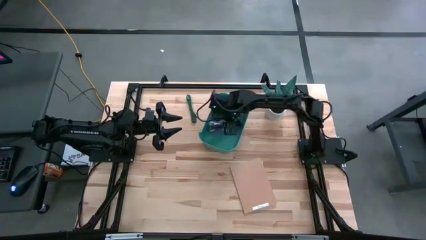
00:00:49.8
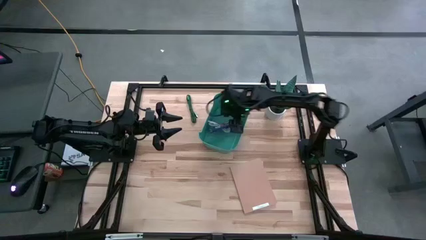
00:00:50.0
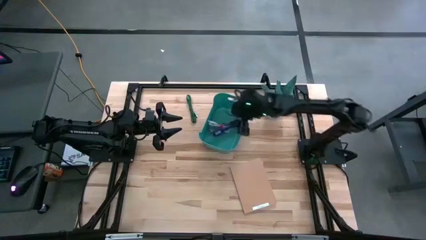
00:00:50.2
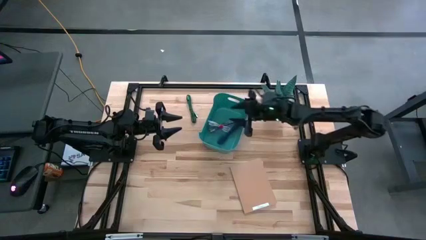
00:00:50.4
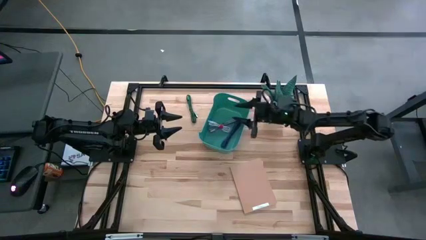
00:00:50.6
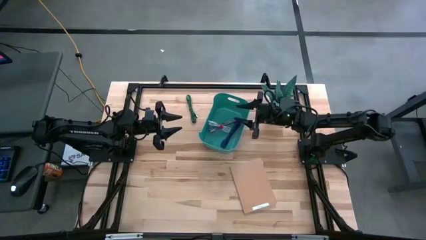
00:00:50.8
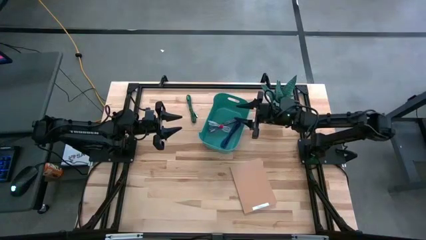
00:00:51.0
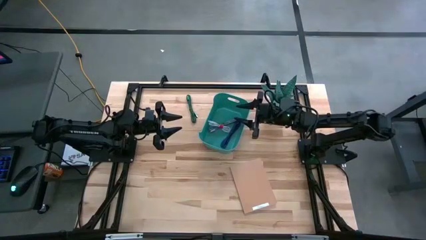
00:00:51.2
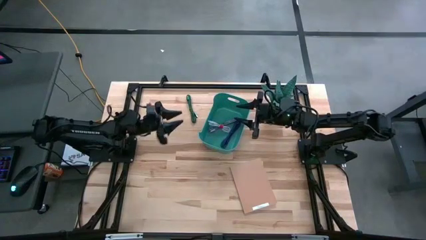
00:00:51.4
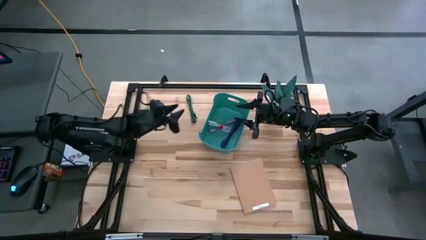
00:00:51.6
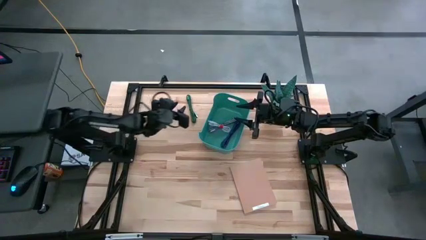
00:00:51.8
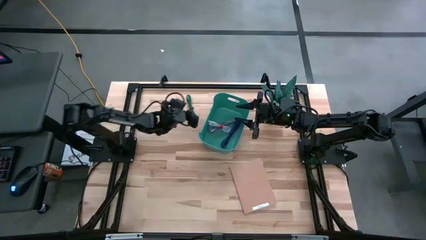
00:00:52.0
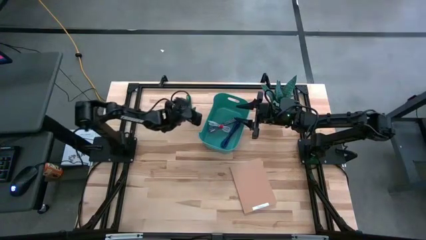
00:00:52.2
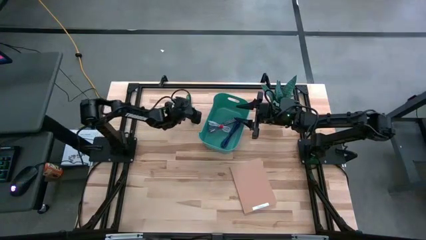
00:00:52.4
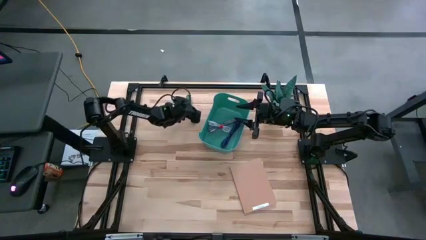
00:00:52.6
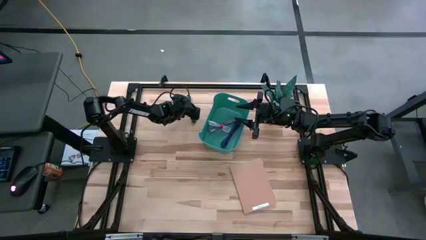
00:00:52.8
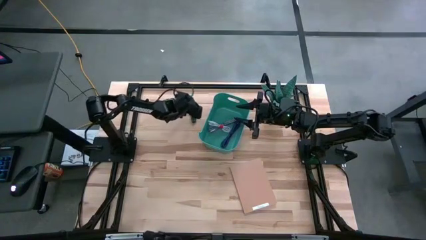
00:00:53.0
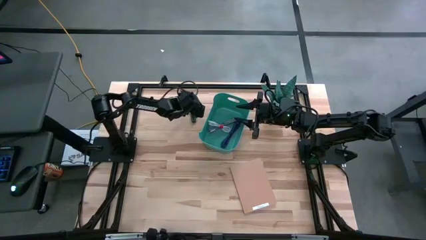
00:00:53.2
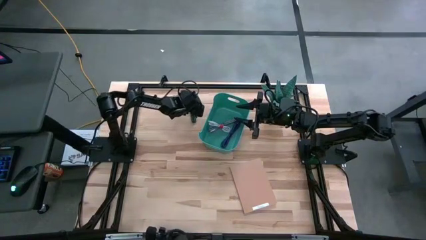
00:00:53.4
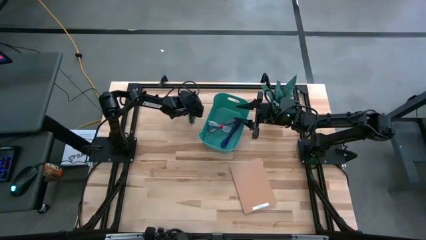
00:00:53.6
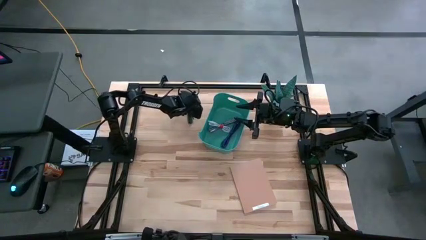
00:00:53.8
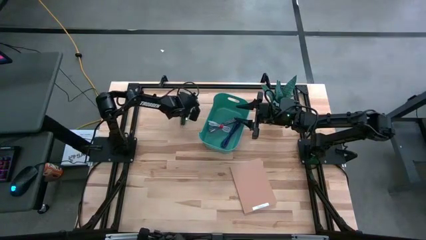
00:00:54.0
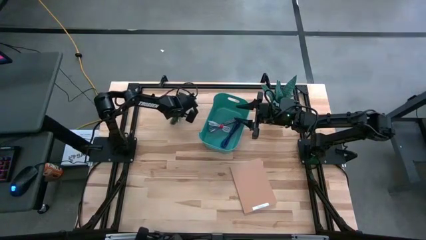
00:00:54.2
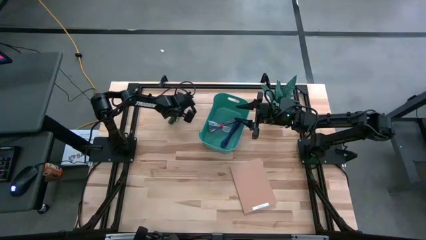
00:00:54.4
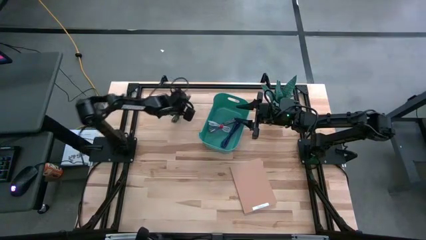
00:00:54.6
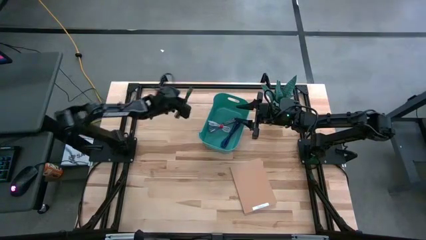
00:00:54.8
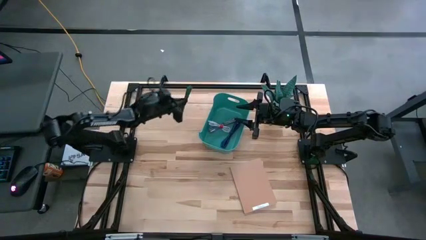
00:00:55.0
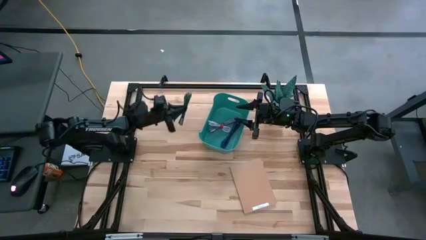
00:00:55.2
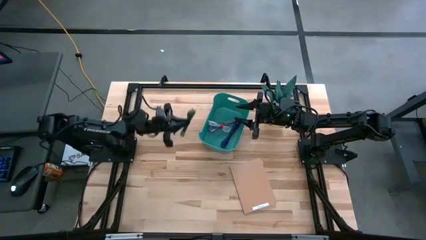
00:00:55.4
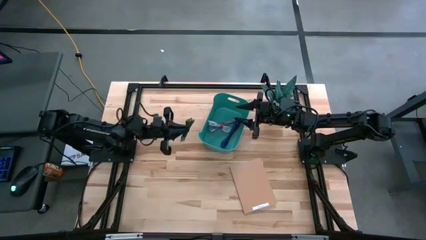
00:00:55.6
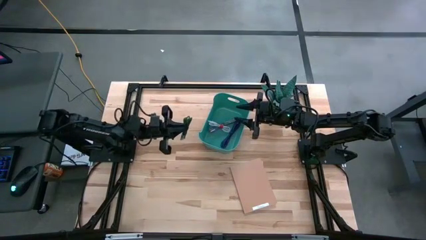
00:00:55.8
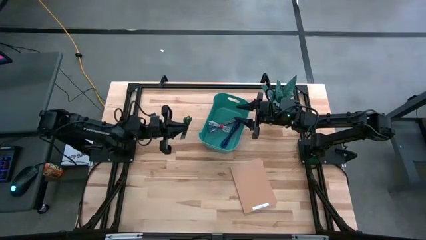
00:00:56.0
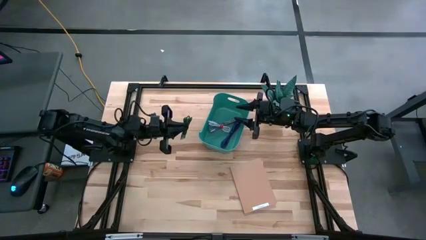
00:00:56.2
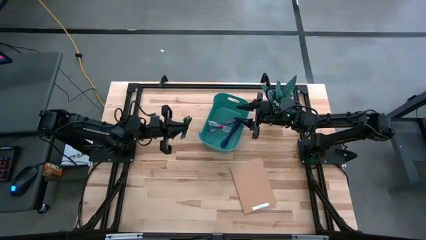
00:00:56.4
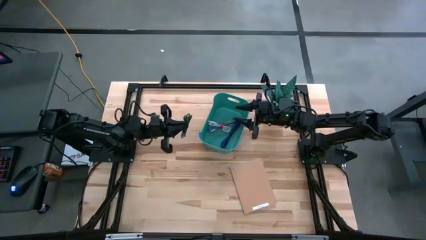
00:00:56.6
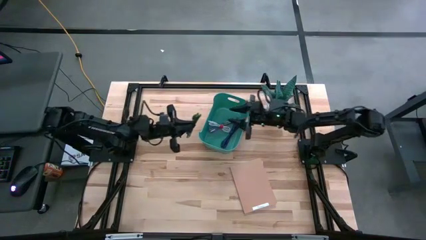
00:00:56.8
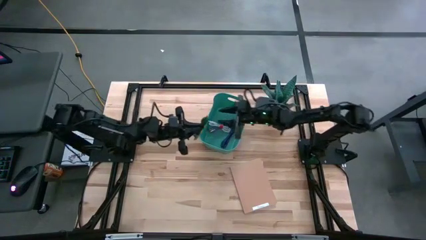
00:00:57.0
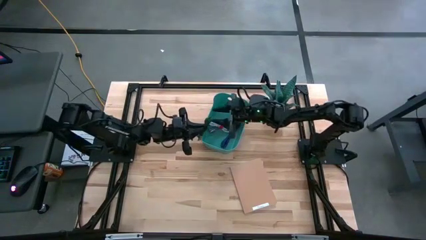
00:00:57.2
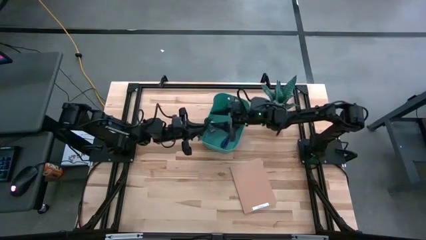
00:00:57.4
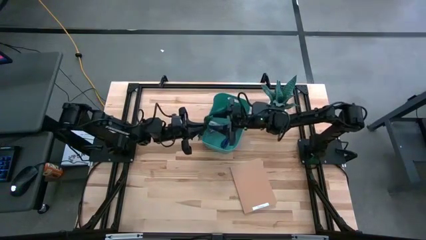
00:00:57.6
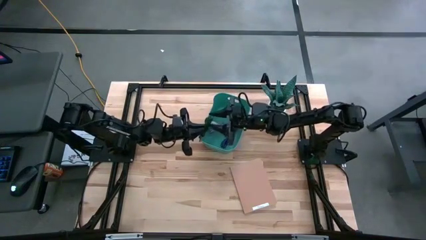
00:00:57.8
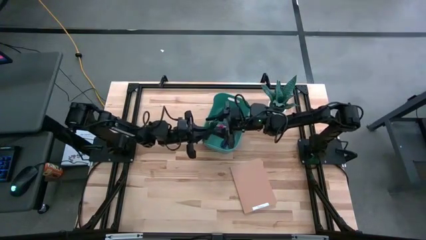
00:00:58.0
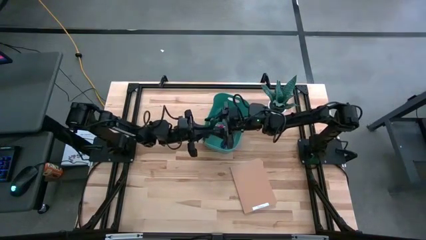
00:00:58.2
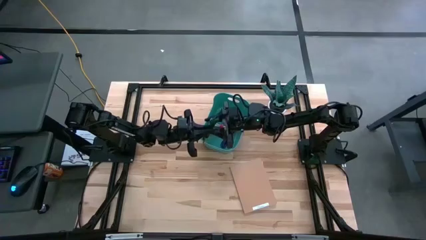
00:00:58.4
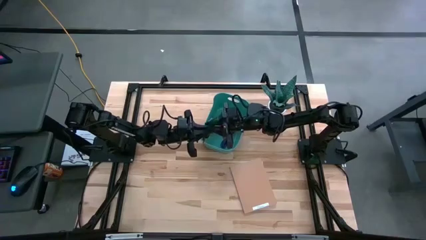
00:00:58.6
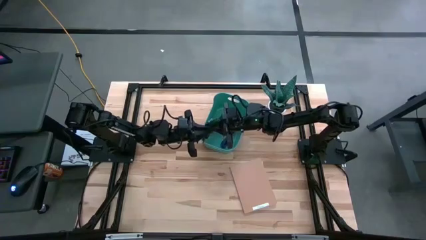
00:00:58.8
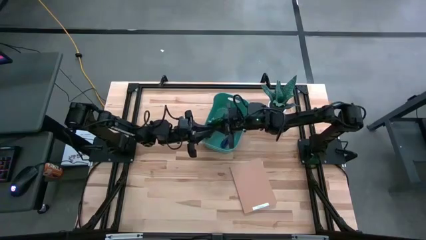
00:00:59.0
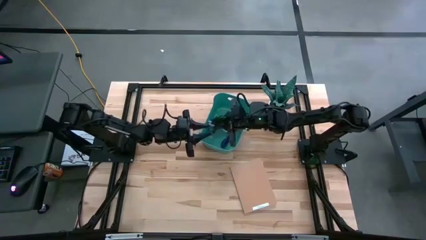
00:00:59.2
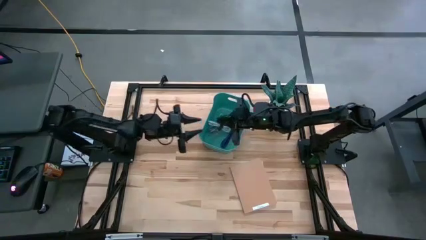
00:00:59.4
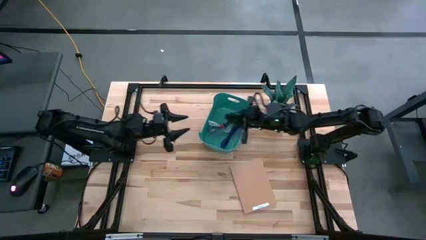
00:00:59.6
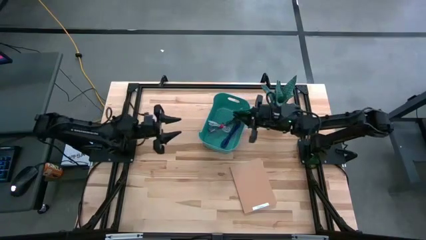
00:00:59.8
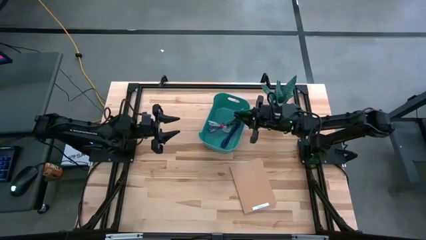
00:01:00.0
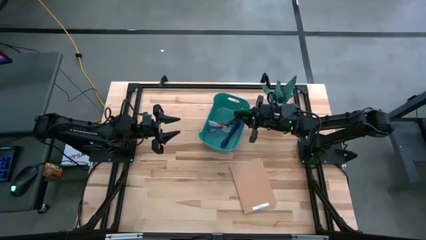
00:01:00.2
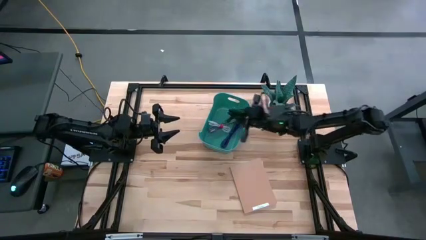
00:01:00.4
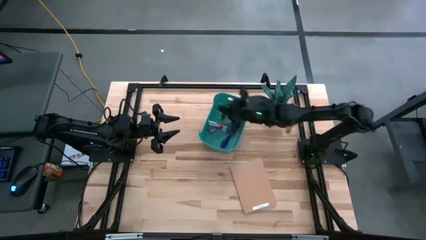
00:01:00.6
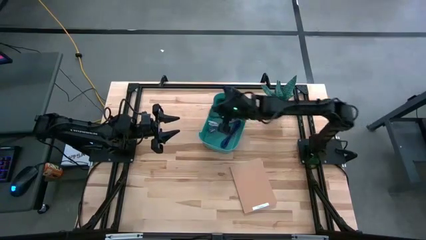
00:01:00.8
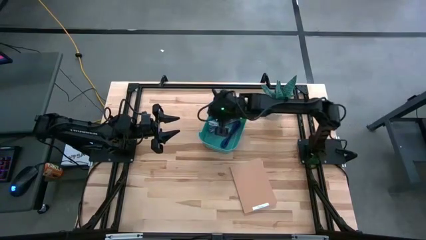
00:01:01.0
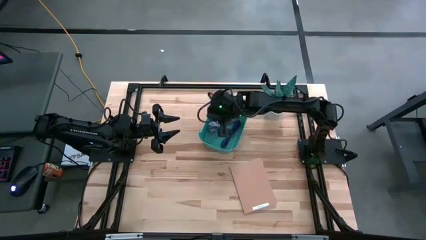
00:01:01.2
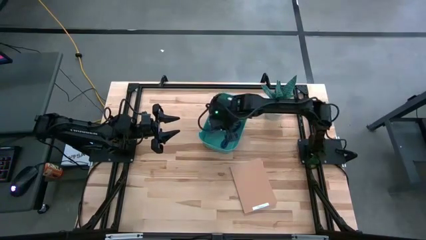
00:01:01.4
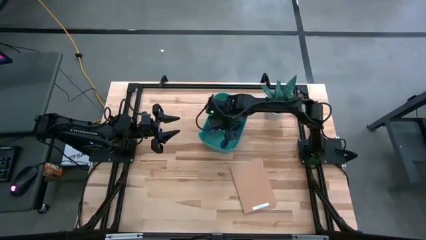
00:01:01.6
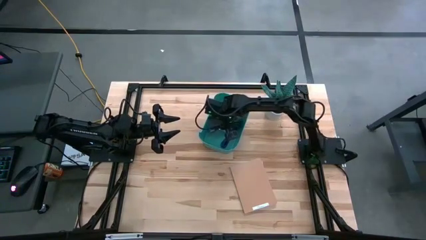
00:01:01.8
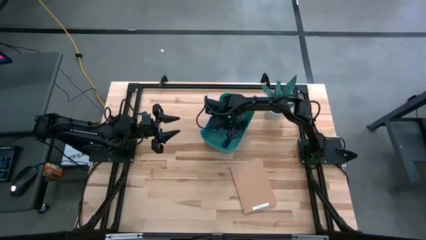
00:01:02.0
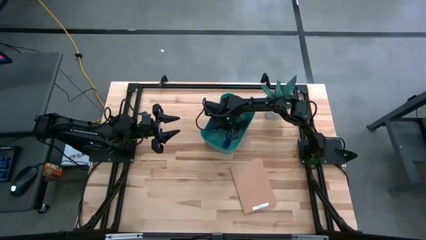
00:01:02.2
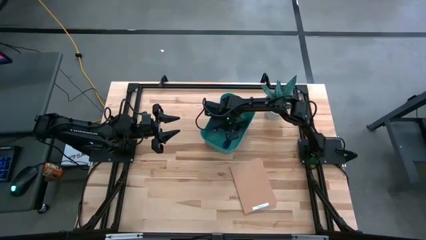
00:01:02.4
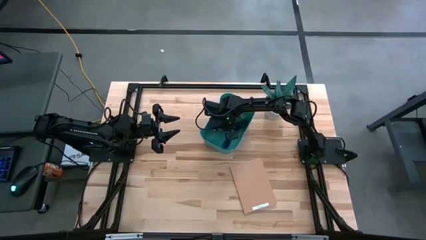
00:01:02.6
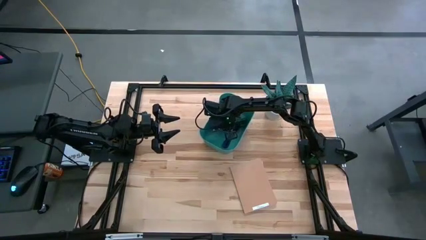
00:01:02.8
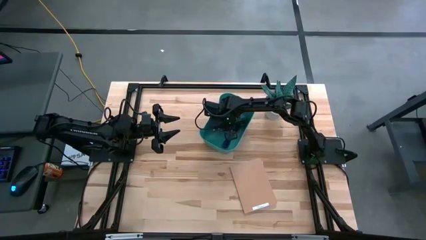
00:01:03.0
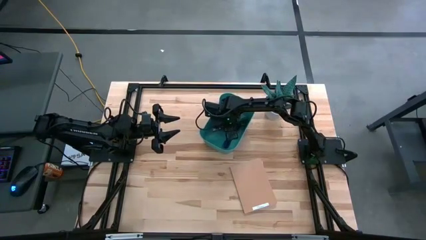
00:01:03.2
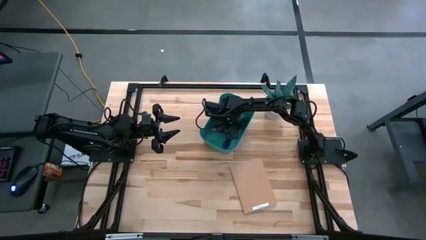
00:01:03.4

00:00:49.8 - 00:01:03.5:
Task: Pick and place USB-C Cables
Put the green charger cable green bin

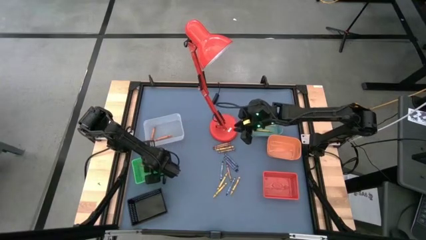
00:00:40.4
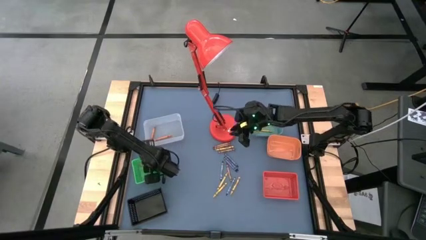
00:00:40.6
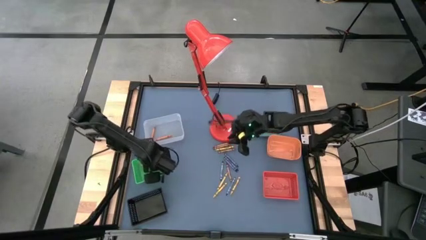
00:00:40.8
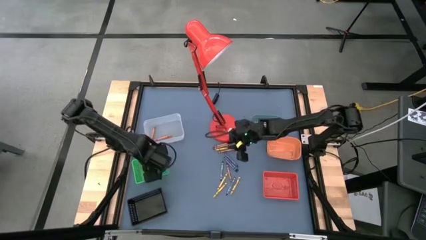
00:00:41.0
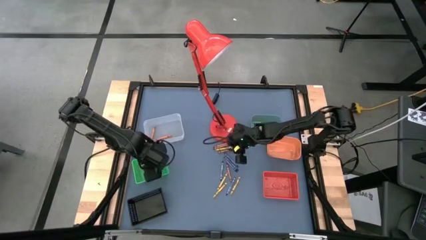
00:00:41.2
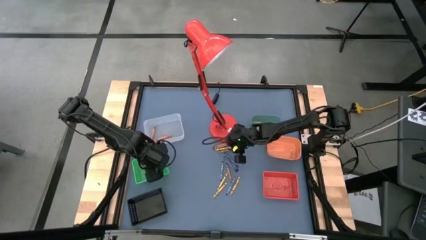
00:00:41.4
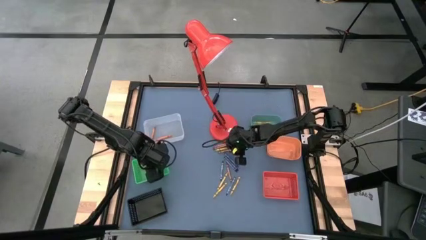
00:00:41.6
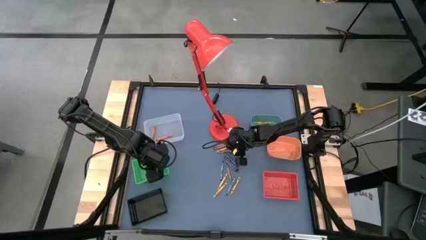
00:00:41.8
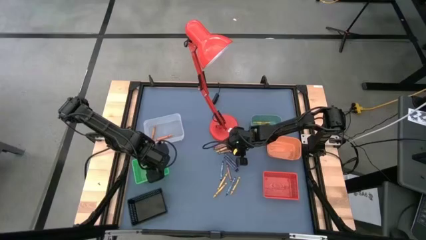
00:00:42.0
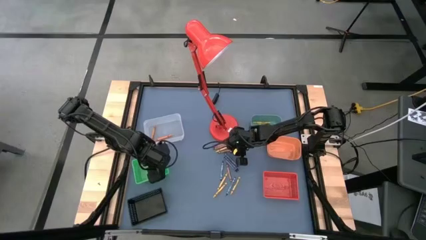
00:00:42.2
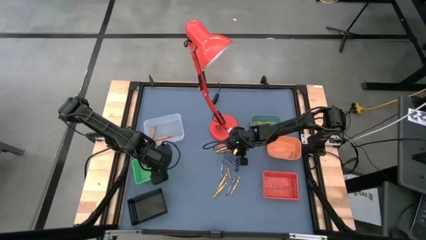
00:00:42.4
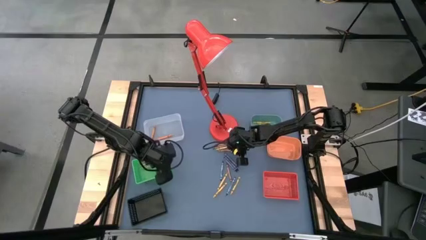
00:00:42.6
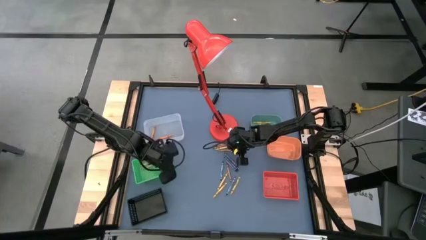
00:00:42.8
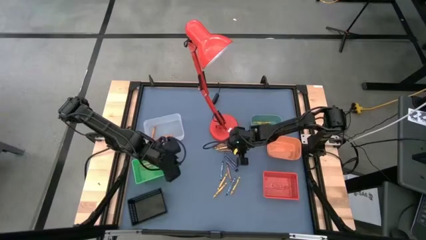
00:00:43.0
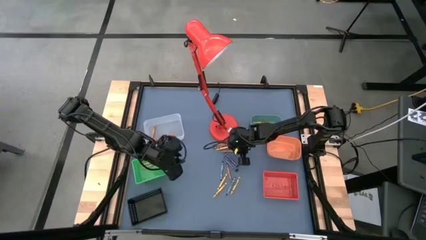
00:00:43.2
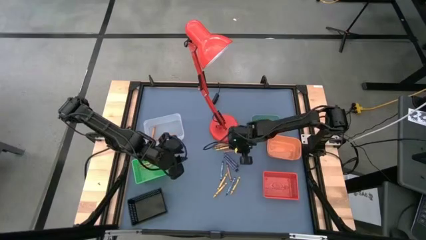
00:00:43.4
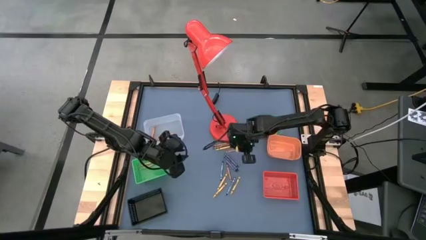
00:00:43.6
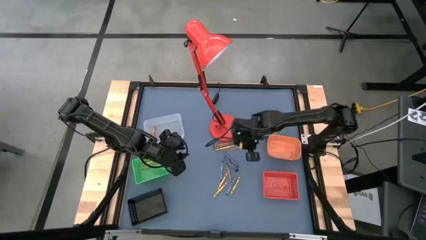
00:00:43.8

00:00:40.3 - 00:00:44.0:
Task: Sort crayons
Put the brown crayon into the orange bin
